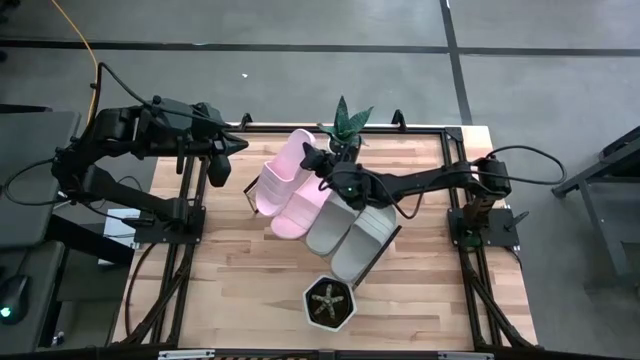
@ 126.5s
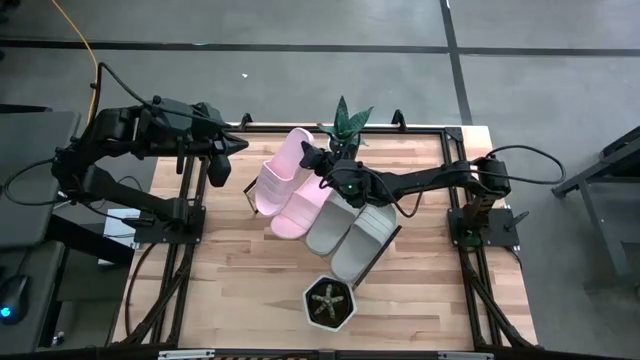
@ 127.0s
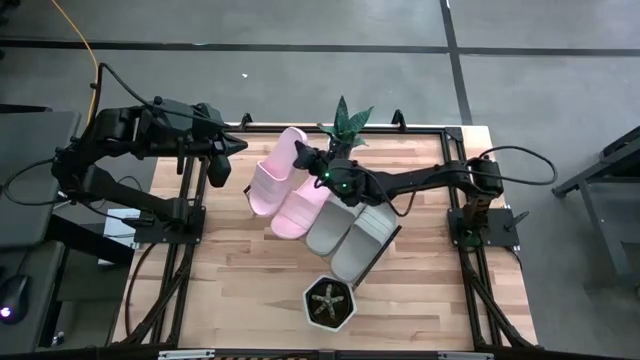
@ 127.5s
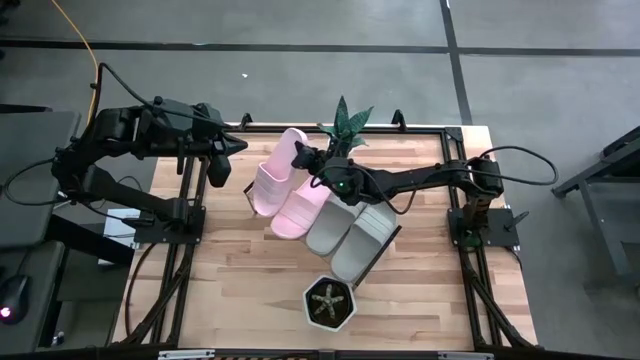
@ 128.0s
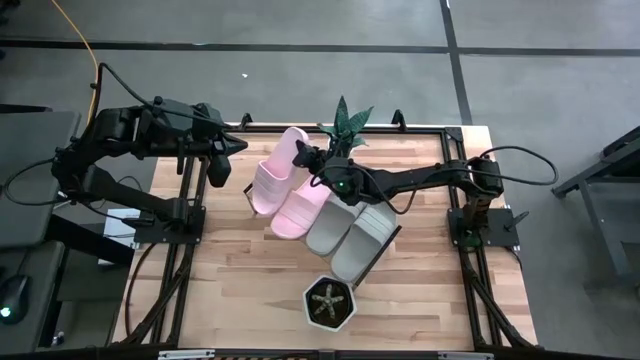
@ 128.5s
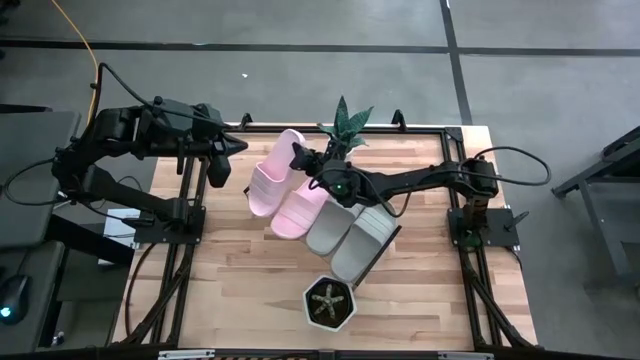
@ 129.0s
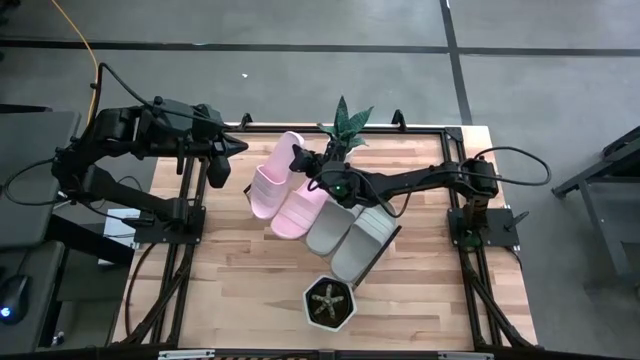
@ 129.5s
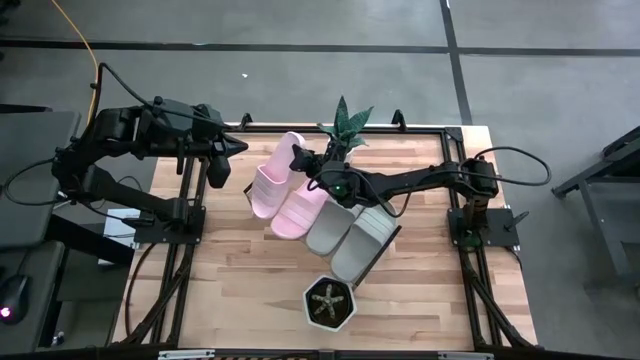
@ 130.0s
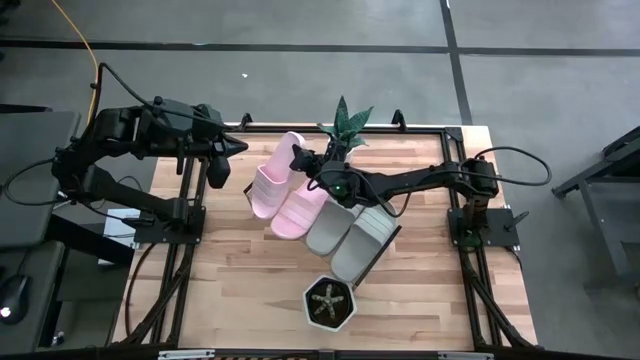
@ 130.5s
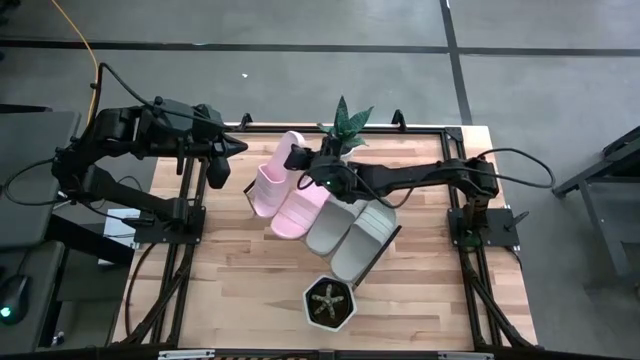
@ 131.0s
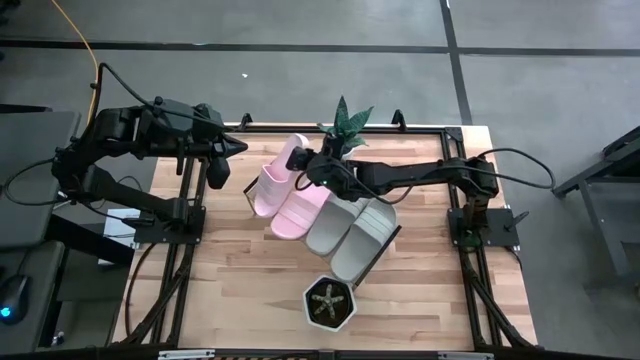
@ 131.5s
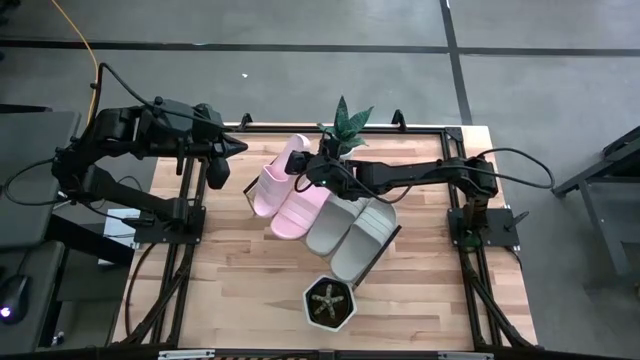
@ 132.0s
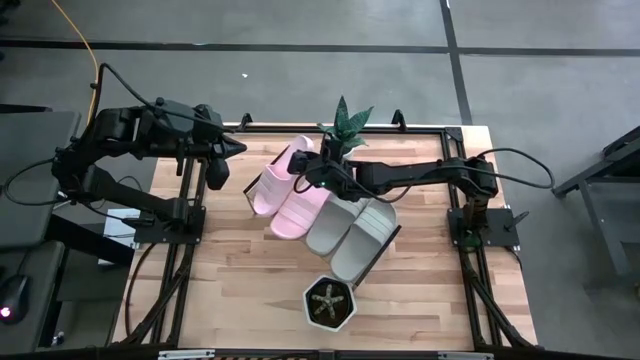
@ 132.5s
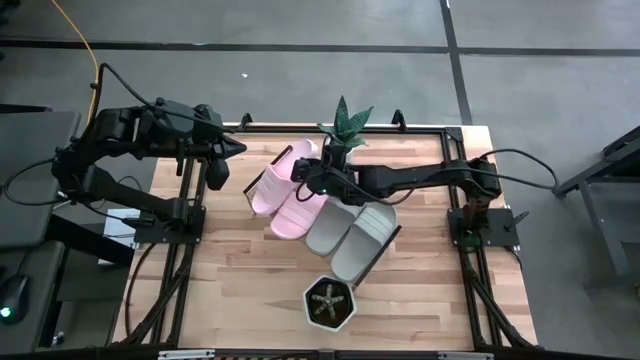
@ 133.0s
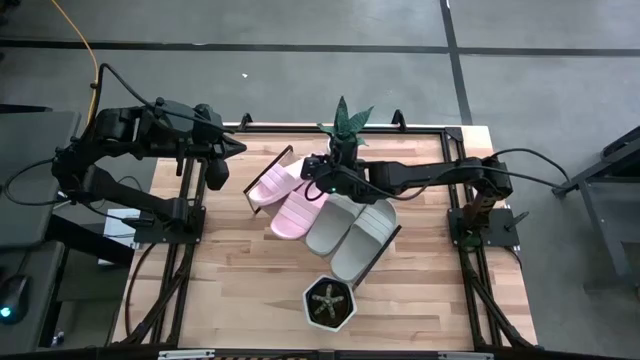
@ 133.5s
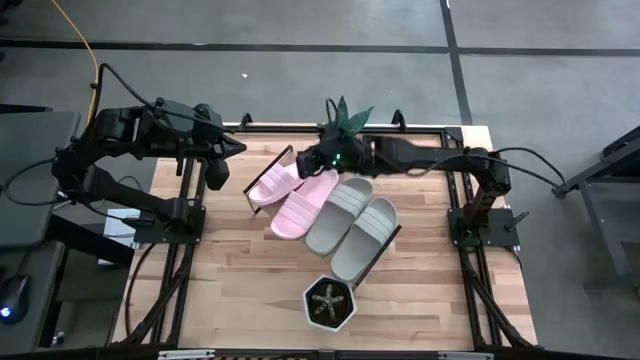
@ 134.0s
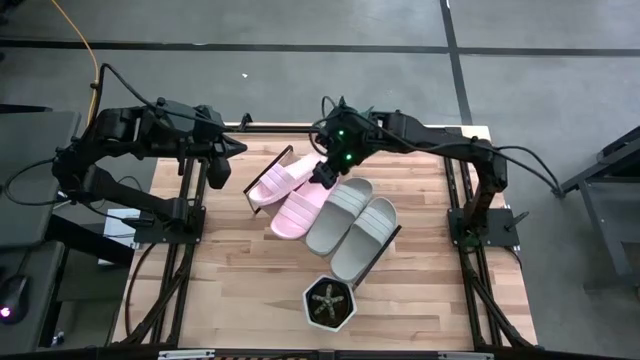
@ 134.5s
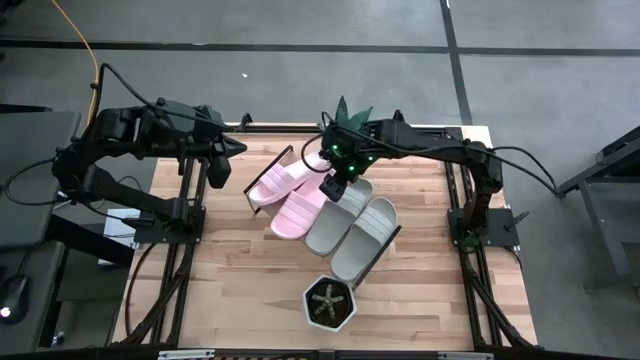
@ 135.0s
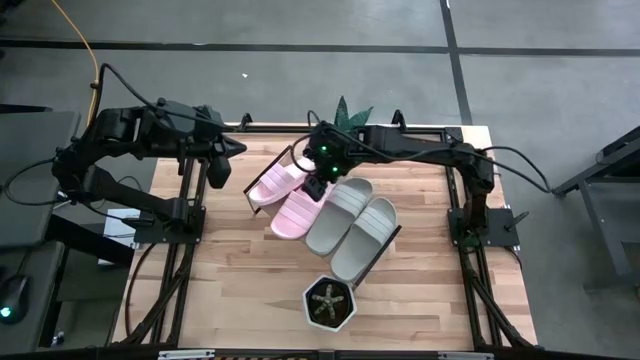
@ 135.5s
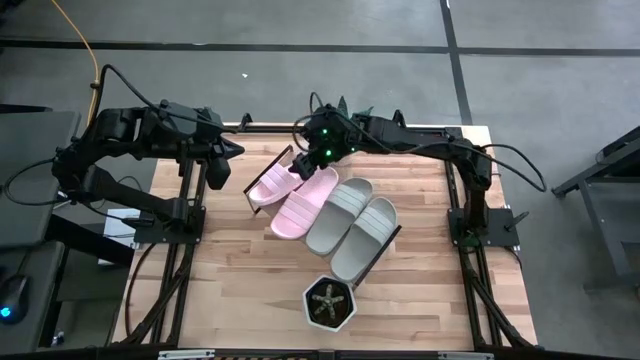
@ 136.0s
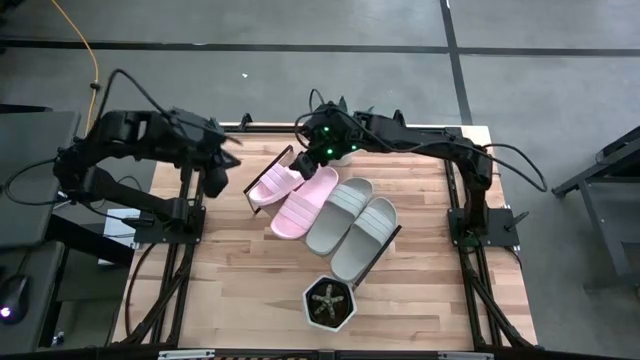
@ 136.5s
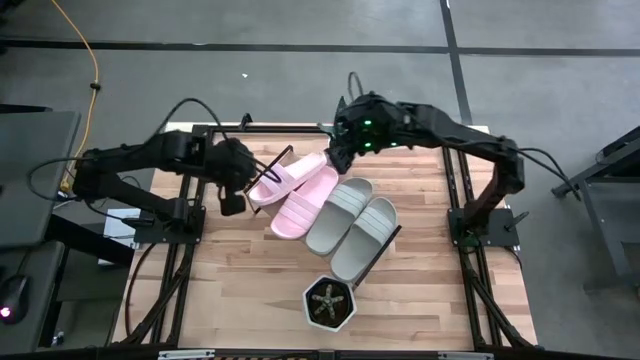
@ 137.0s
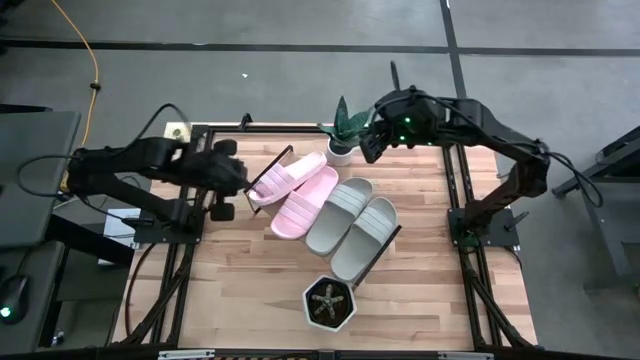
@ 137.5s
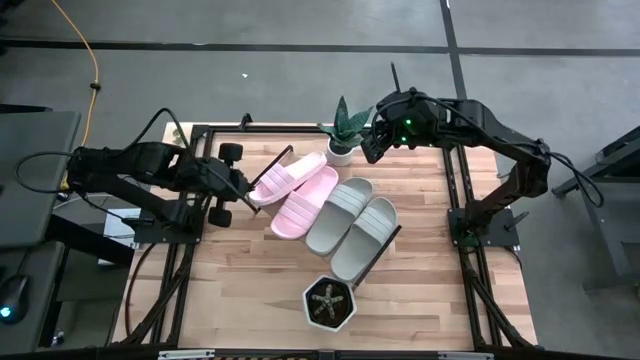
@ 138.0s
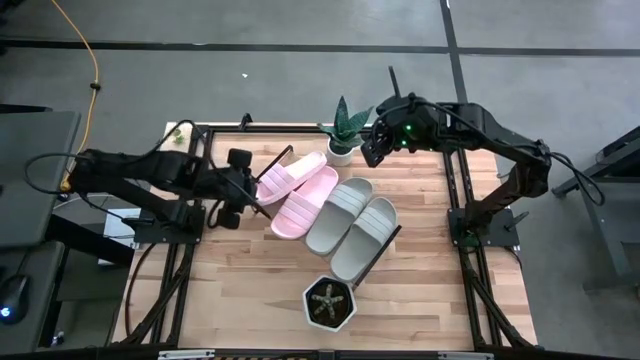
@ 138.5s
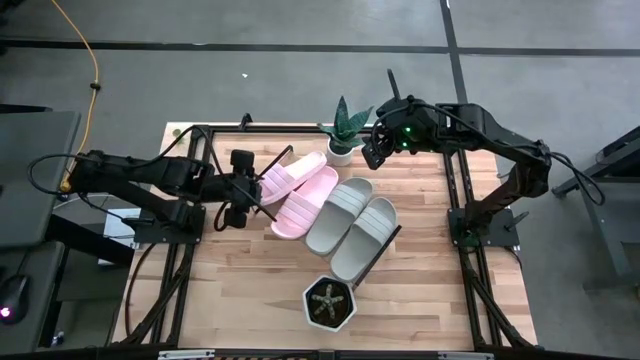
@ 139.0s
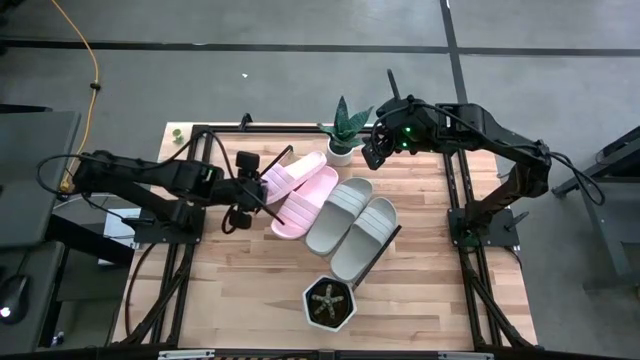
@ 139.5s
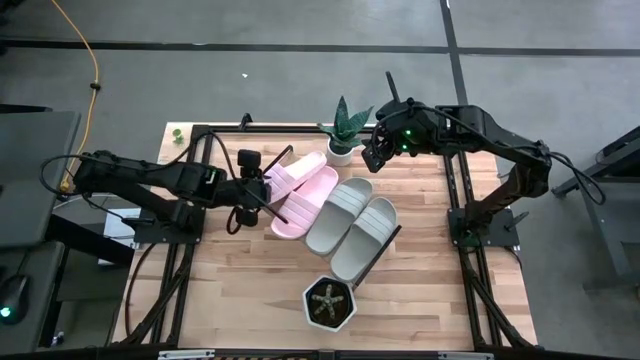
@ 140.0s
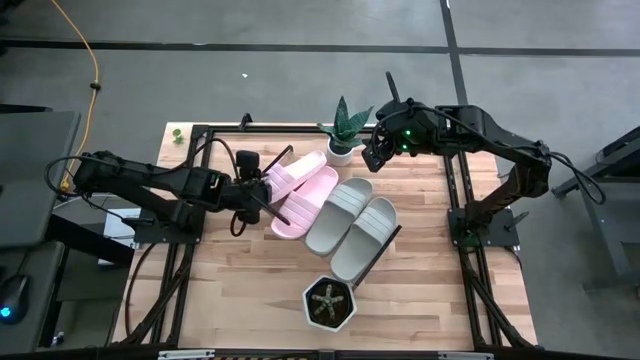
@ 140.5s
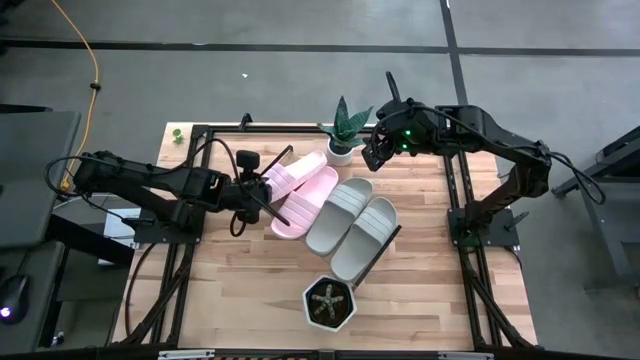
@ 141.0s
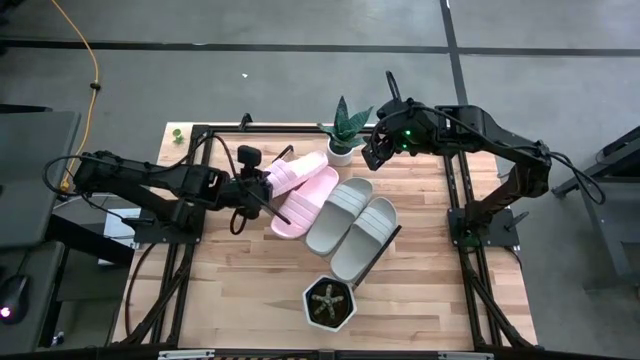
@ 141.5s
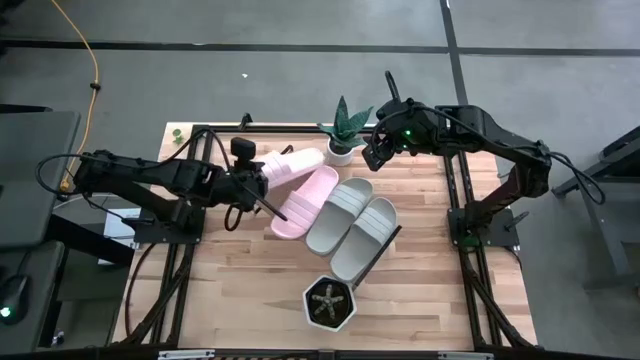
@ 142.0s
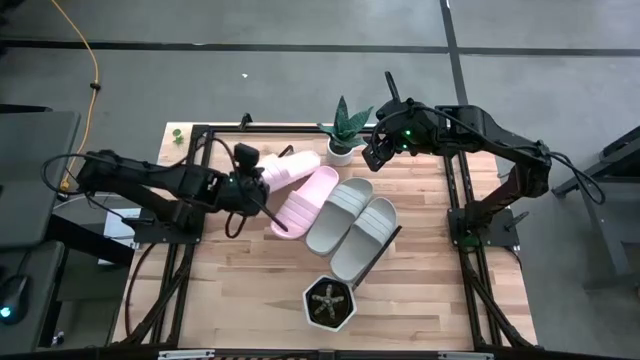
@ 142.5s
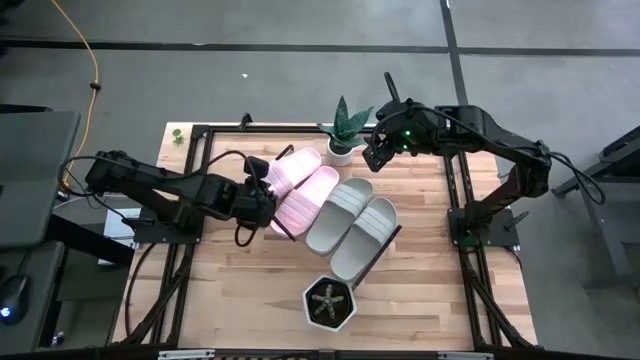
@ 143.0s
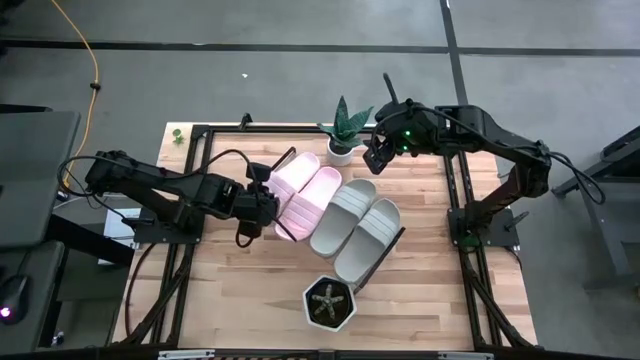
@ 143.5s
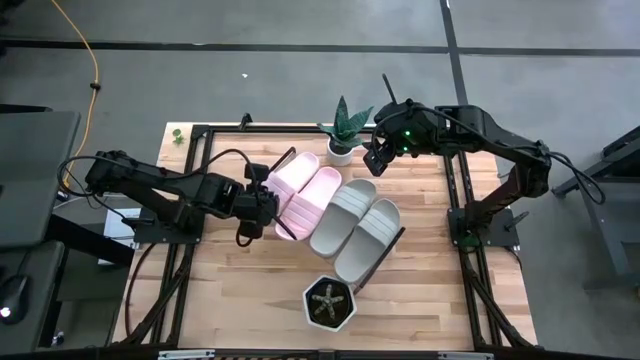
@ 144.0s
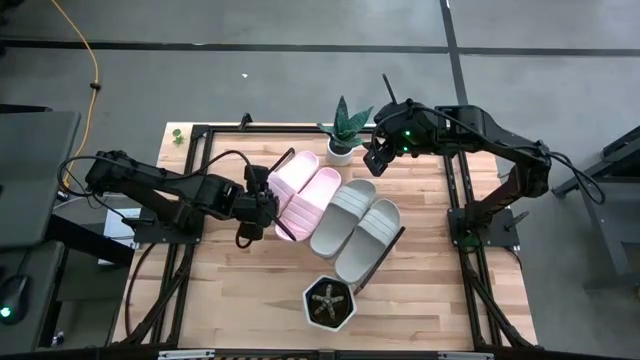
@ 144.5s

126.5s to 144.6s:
Task: Pick and place slides into the shelf
Put the pink slipper on the shelf
